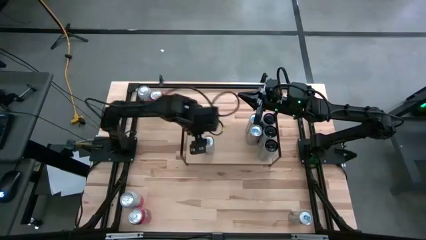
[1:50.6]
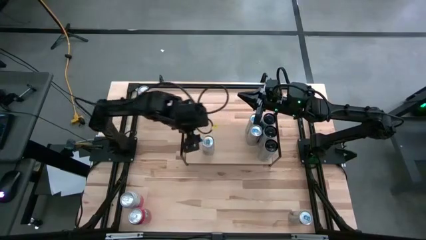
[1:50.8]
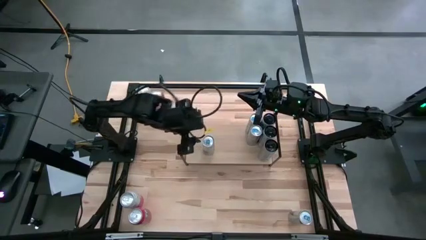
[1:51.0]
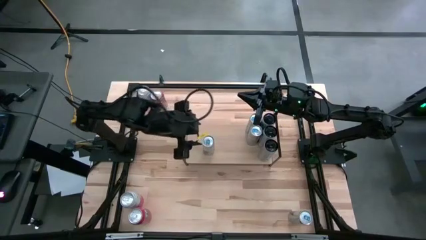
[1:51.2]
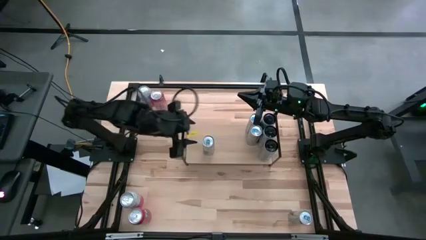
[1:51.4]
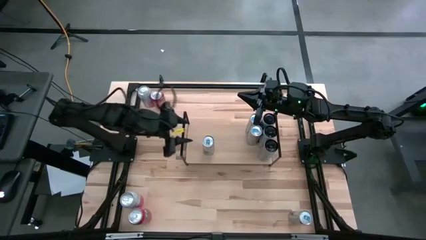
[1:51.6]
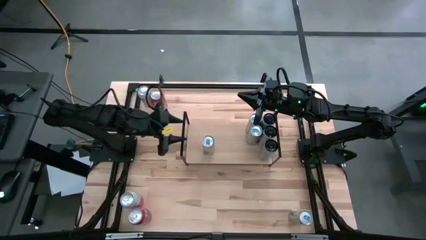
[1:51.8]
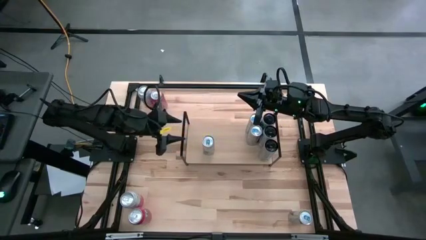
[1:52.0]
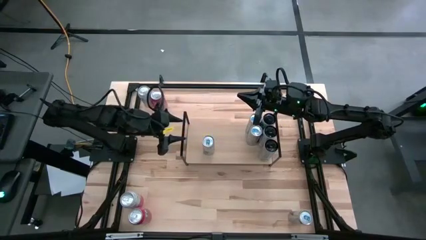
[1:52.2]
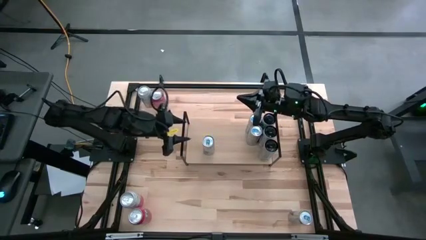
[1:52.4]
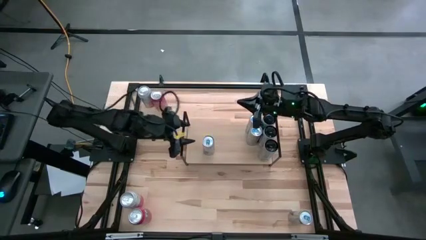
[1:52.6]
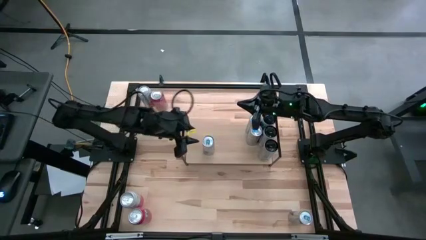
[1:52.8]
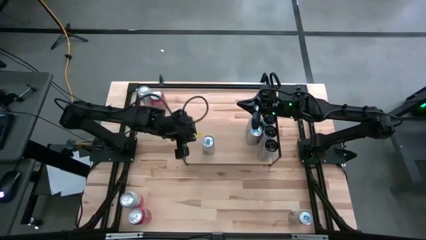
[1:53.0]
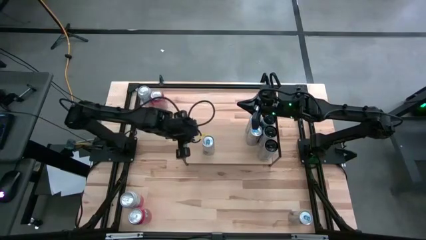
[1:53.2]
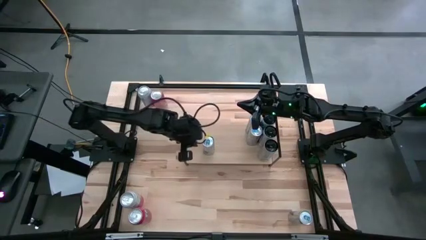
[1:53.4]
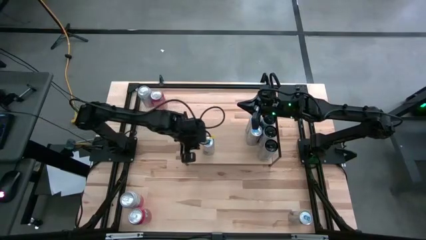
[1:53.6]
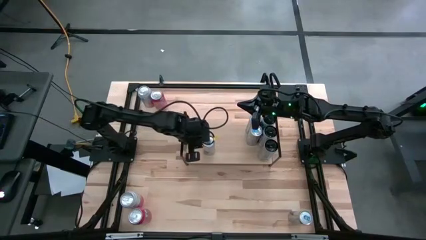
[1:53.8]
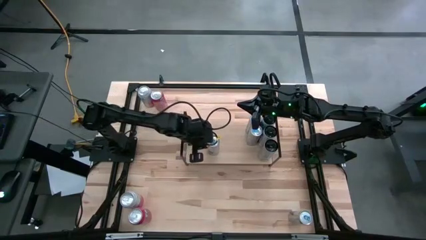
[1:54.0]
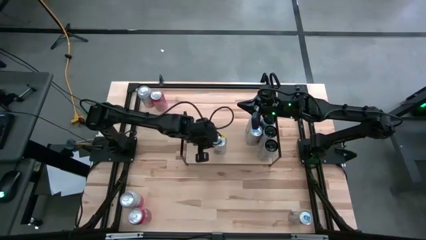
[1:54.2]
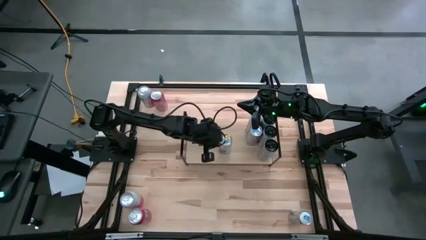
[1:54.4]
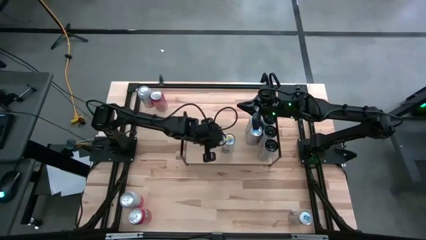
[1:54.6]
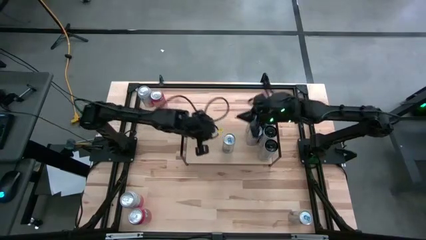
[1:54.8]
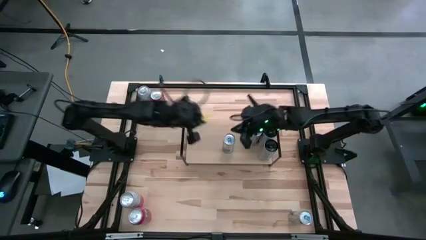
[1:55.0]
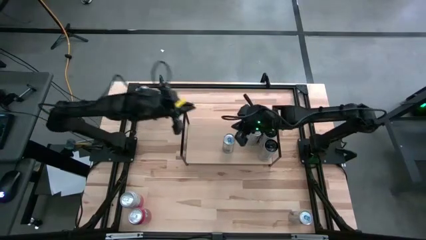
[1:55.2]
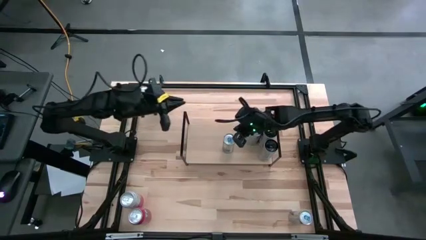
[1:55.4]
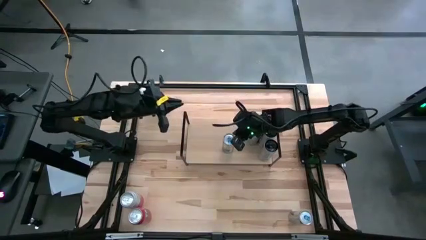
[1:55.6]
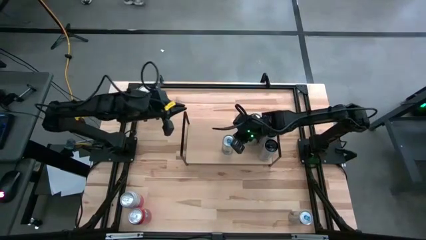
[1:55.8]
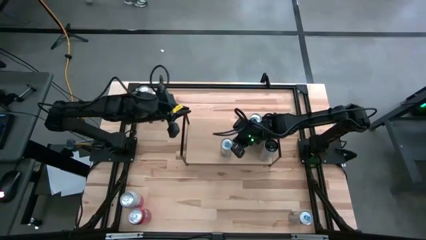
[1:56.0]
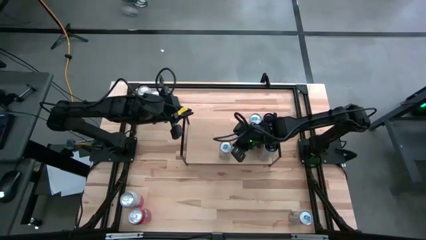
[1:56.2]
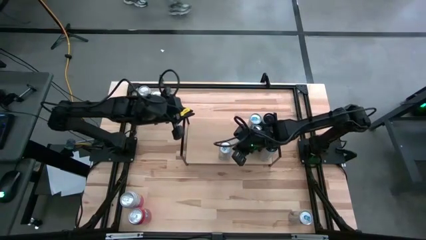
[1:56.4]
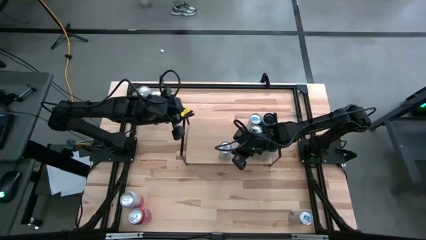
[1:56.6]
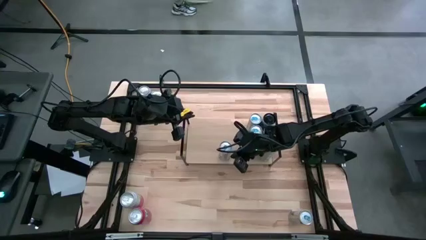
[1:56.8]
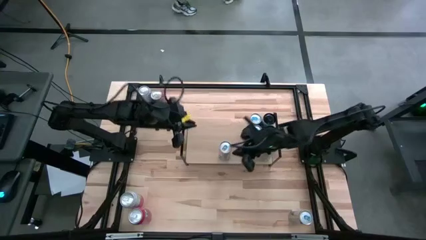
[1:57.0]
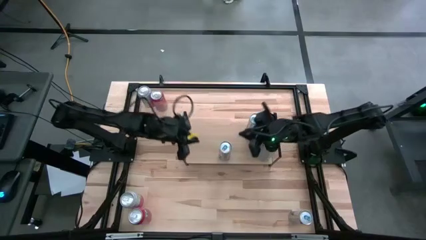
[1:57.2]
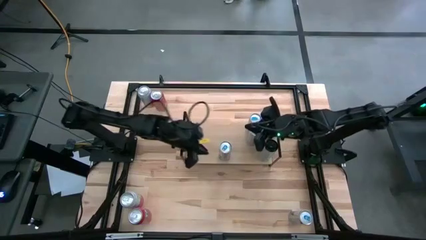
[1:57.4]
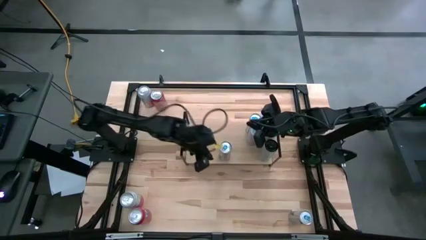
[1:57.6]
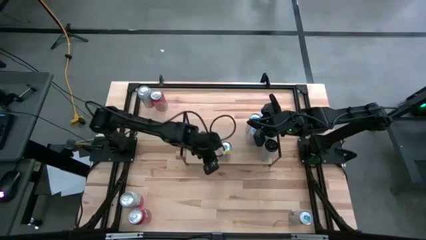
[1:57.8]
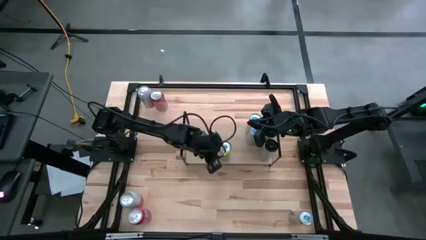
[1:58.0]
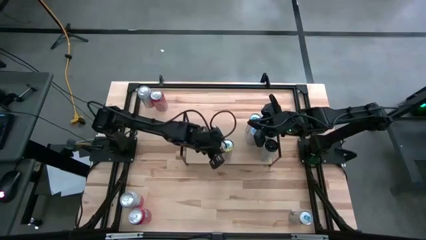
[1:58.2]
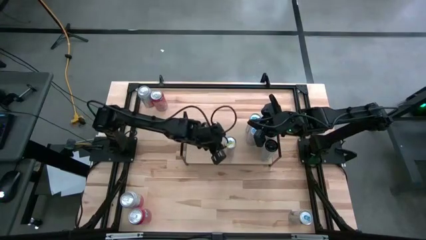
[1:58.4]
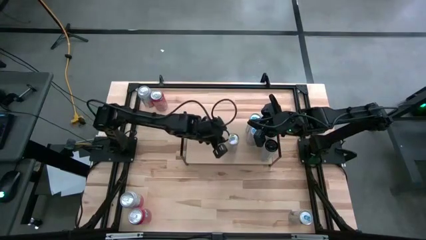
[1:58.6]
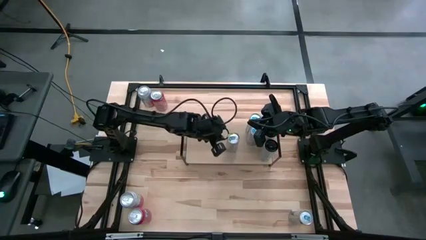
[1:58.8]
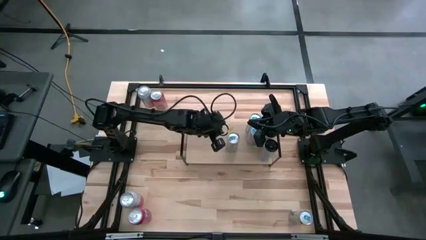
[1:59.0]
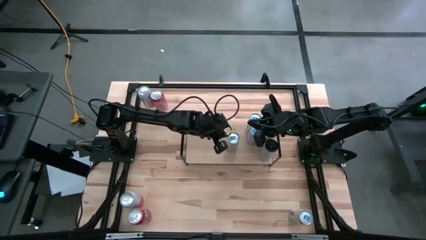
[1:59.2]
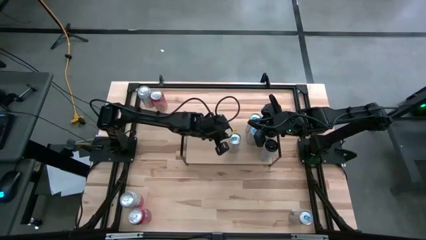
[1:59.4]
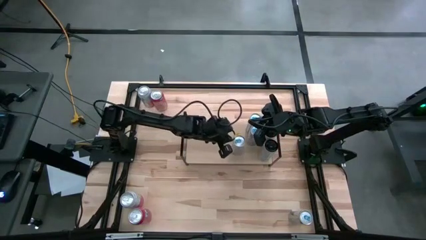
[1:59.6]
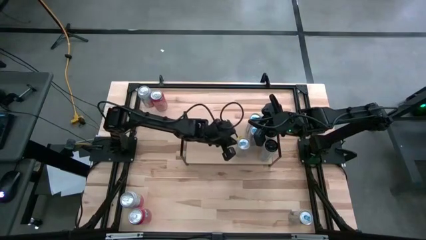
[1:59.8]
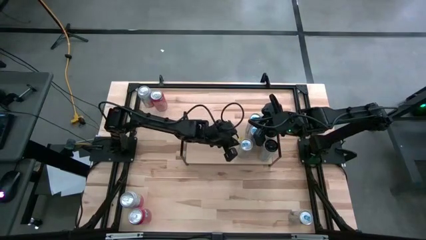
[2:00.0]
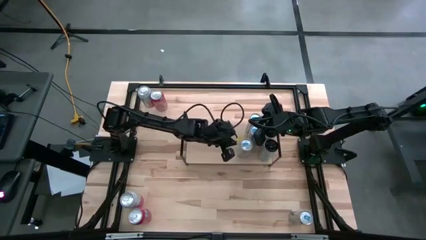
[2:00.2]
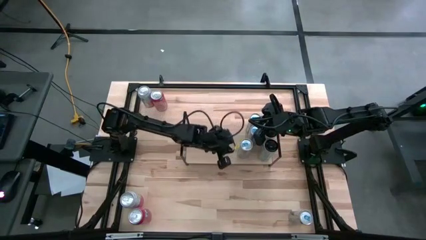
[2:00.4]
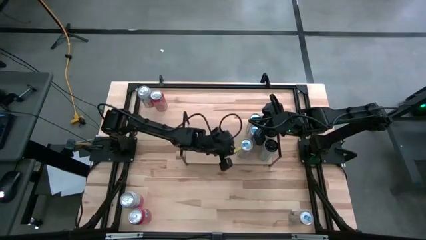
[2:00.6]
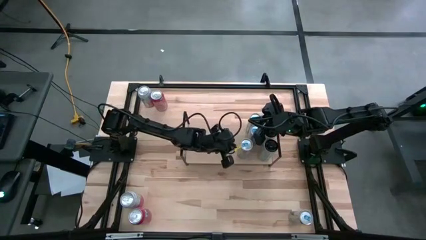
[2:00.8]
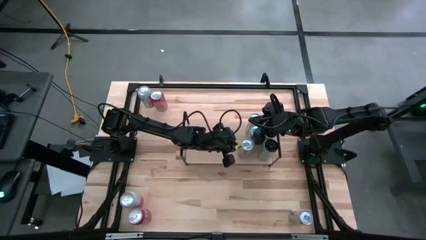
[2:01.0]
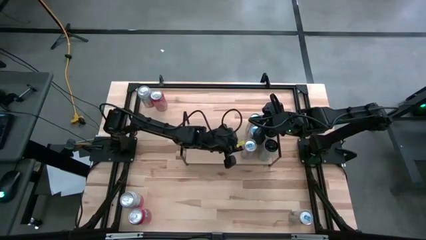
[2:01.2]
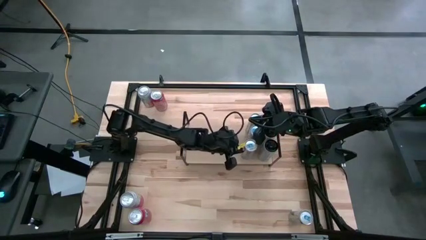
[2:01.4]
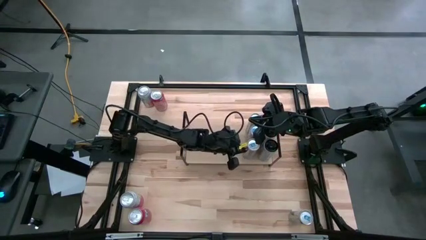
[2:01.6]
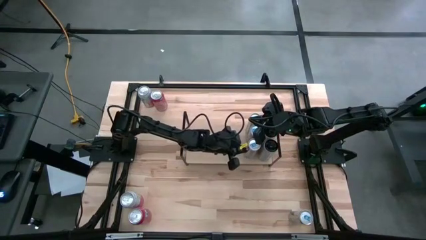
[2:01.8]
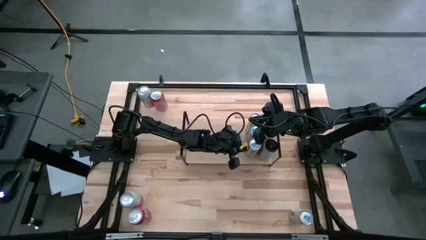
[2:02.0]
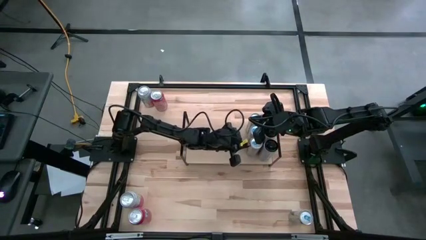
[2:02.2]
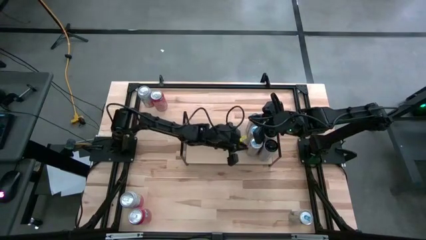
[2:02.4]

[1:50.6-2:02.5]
Task: Place canned beverage on shelf
Put the blue soda can on the shelf aligned with the other blue soda cans

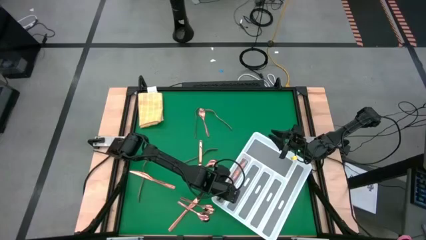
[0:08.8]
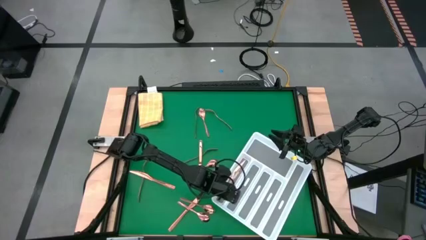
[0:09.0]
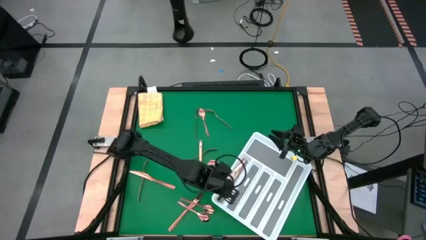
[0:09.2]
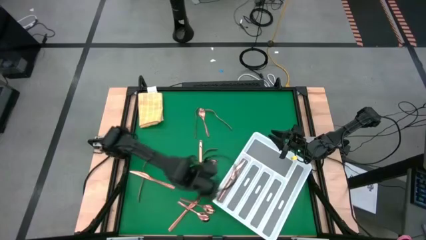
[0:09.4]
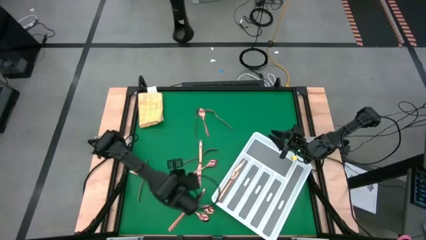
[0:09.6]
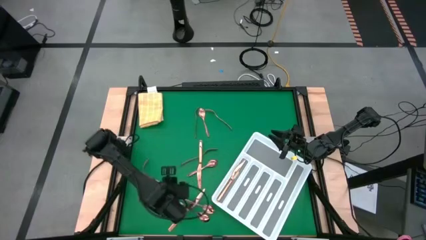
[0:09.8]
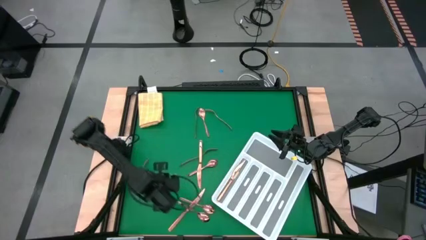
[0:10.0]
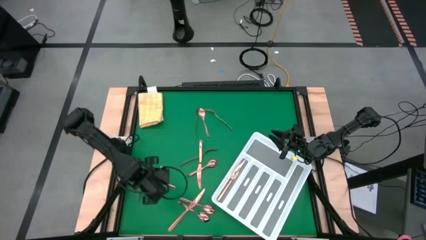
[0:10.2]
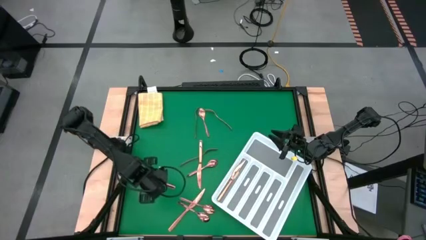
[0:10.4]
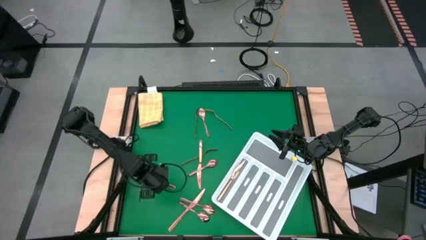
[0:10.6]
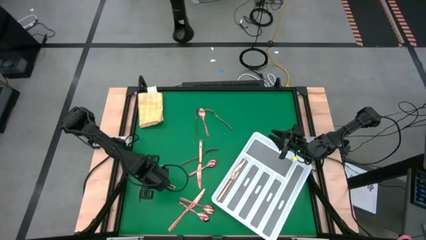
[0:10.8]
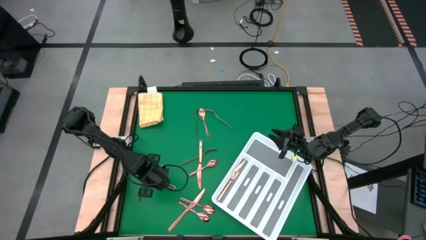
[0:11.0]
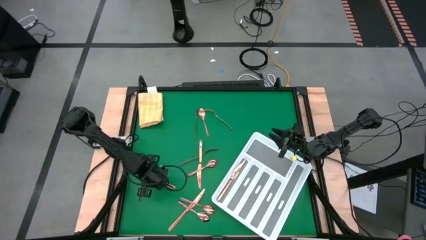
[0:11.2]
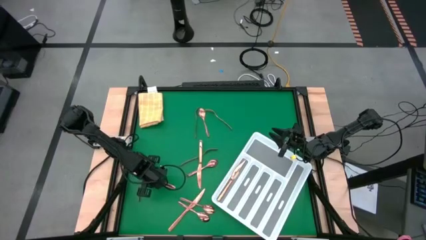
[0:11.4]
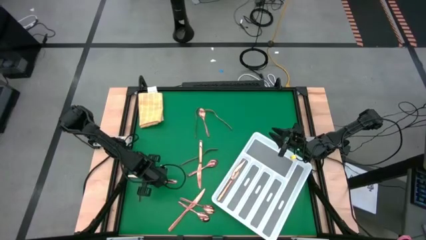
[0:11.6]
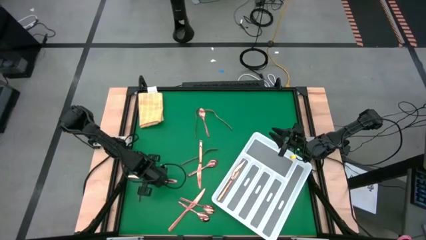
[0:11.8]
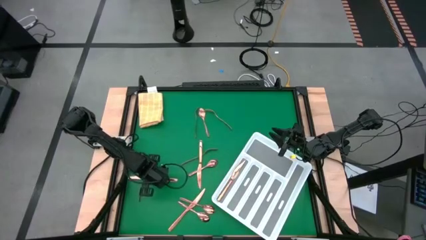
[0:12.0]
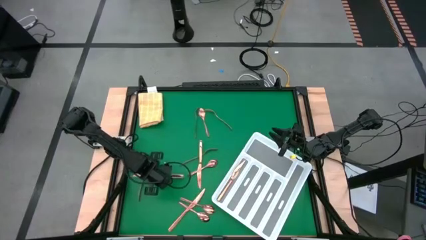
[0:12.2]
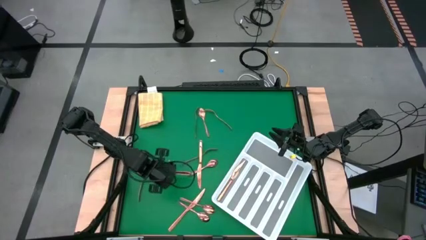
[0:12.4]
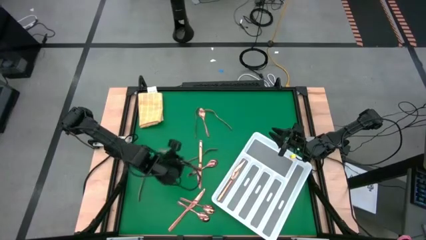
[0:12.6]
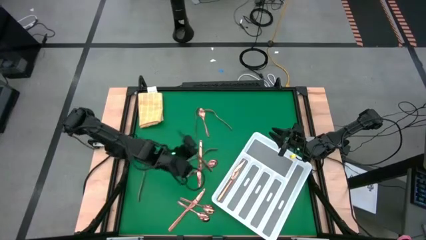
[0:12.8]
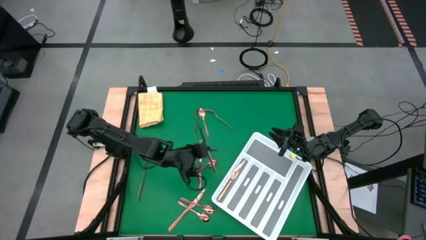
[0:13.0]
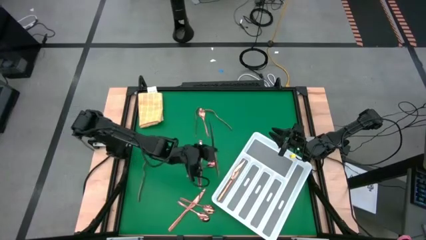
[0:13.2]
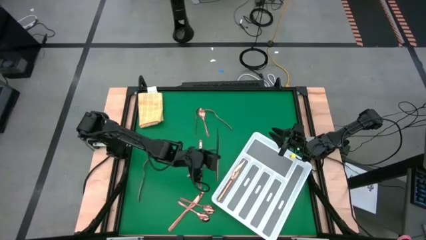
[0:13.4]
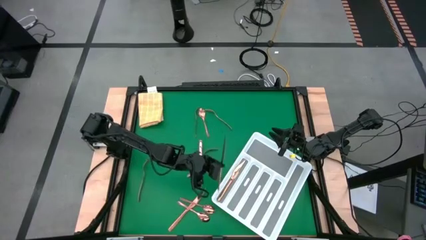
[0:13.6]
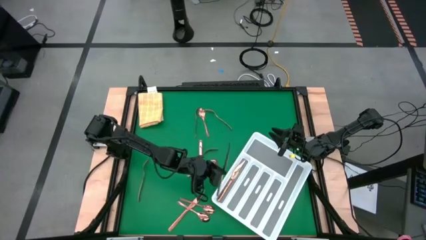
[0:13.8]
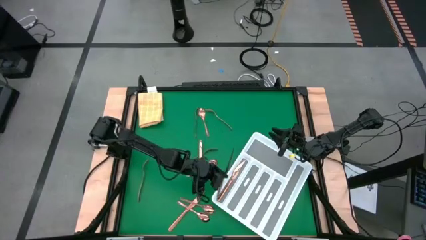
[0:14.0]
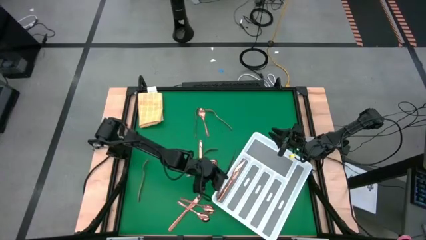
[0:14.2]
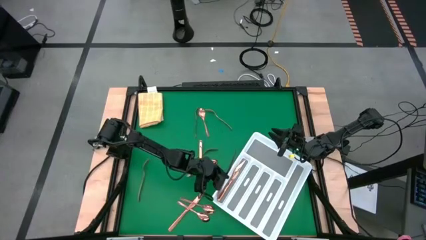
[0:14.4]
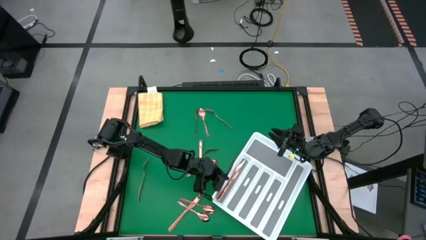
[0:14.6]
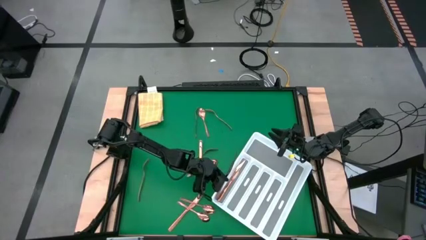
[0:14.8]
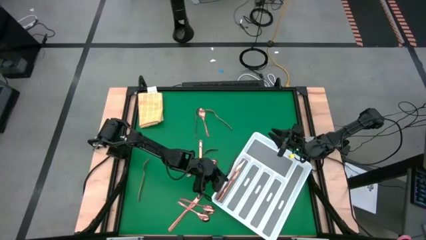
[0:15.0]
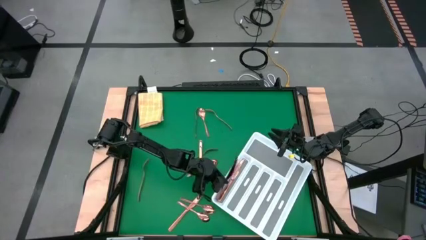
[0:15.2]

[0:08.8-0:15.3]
Task: Sort silverware
Put the gold table knife into the white cutlery tray
